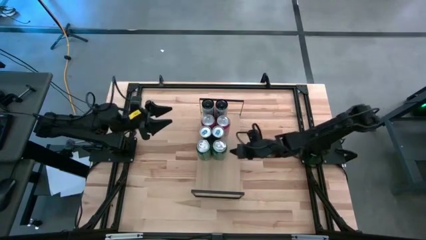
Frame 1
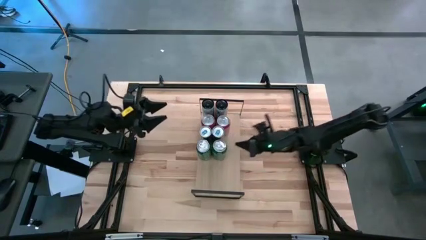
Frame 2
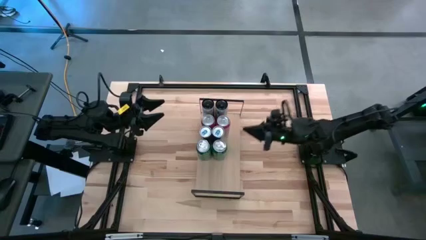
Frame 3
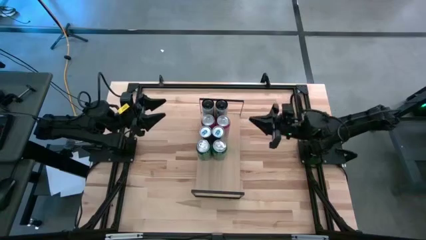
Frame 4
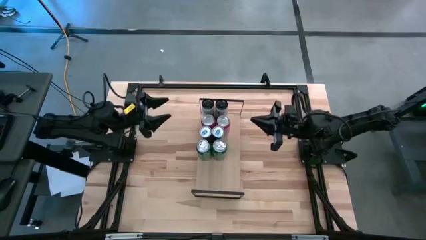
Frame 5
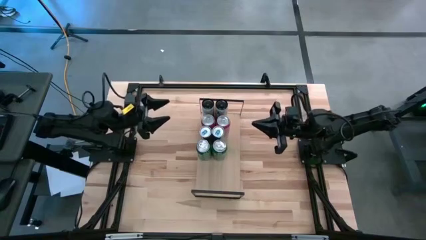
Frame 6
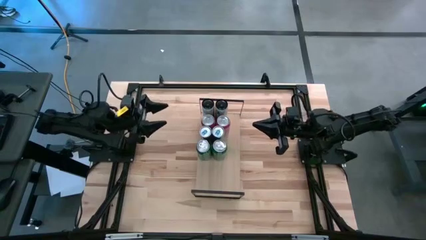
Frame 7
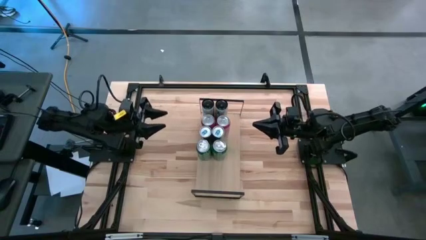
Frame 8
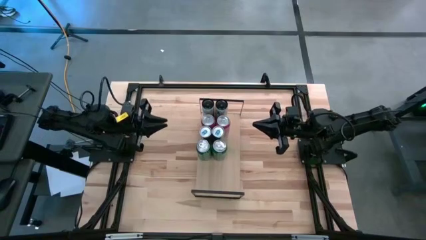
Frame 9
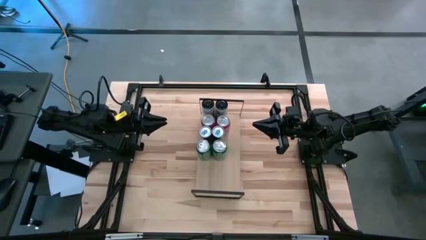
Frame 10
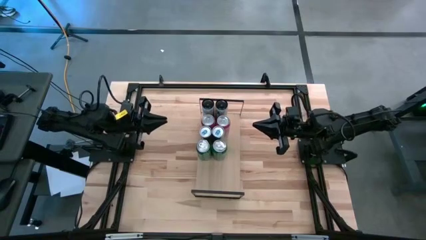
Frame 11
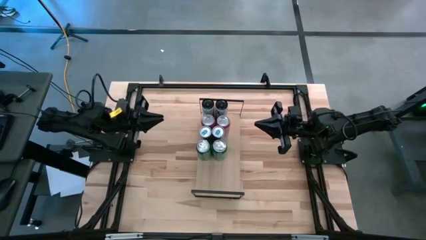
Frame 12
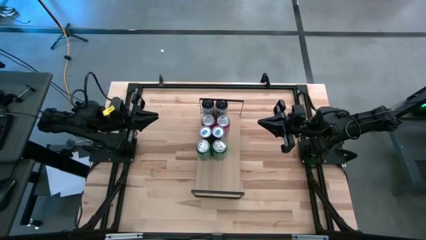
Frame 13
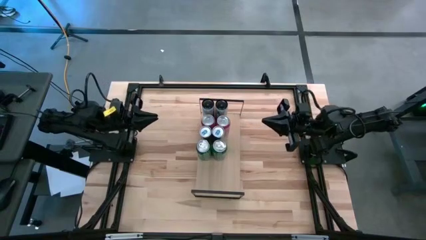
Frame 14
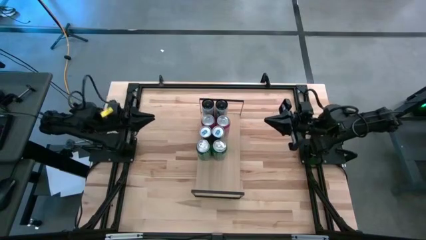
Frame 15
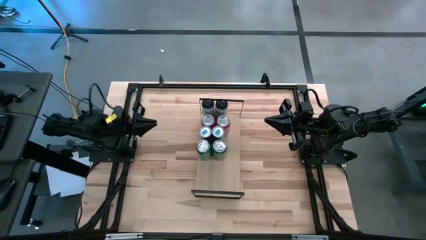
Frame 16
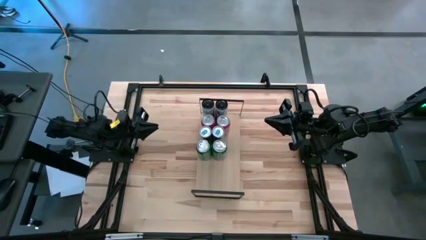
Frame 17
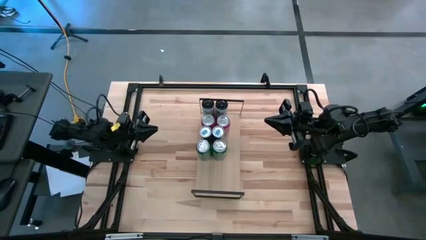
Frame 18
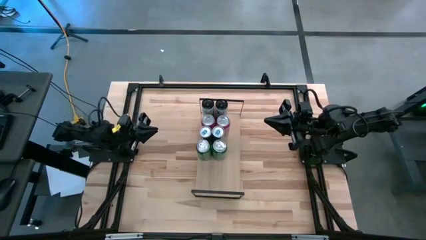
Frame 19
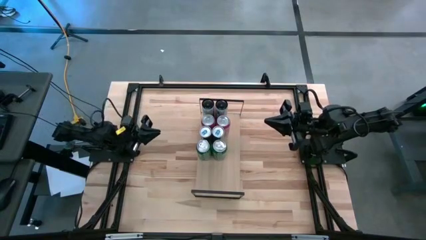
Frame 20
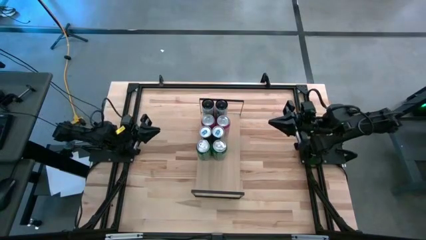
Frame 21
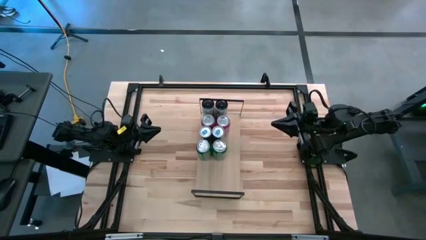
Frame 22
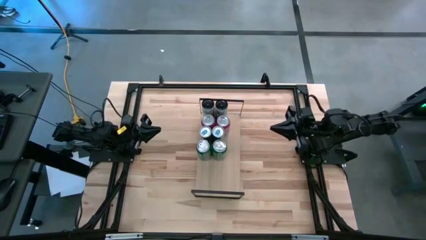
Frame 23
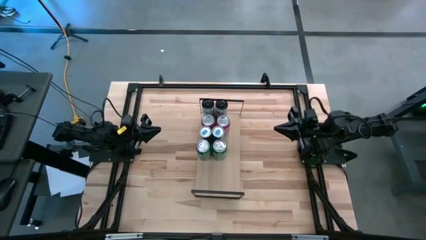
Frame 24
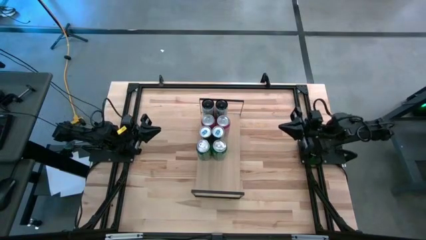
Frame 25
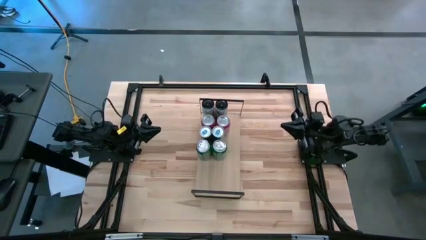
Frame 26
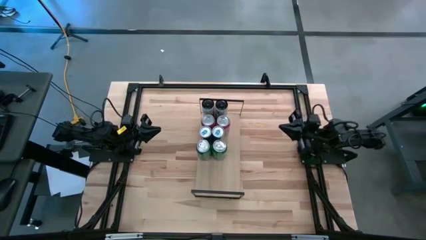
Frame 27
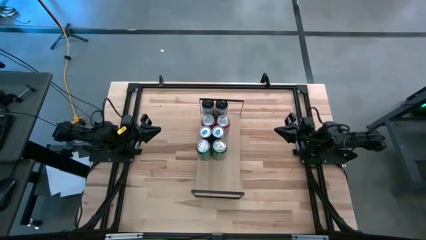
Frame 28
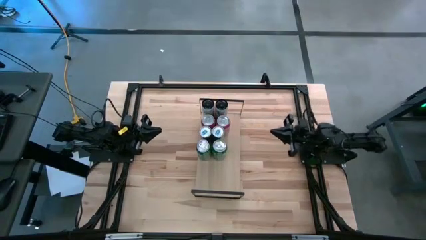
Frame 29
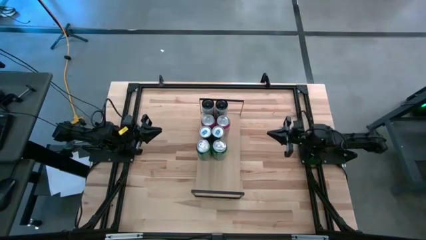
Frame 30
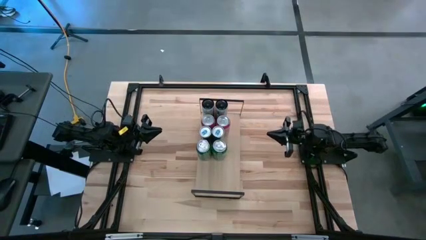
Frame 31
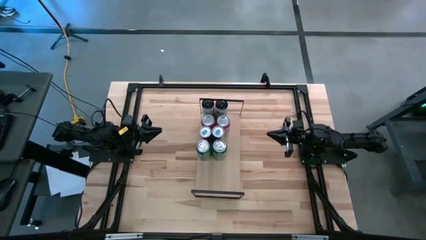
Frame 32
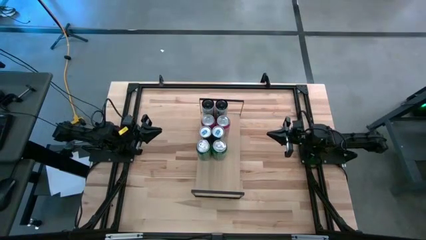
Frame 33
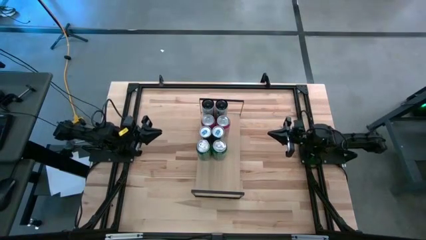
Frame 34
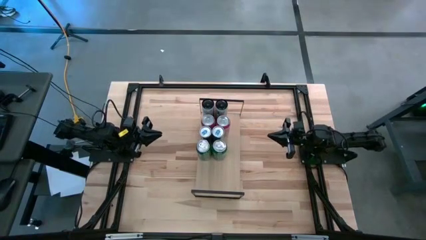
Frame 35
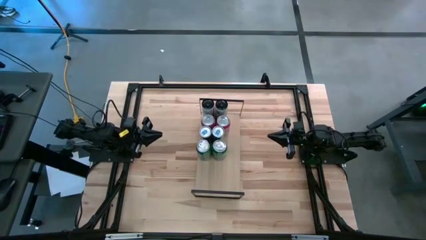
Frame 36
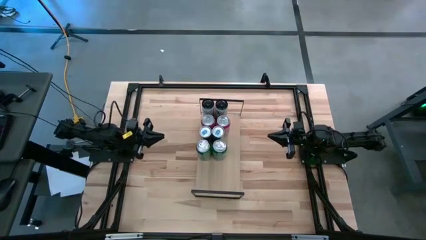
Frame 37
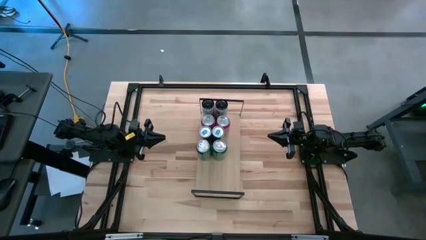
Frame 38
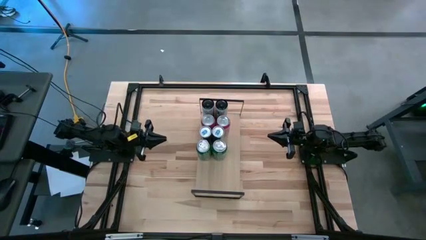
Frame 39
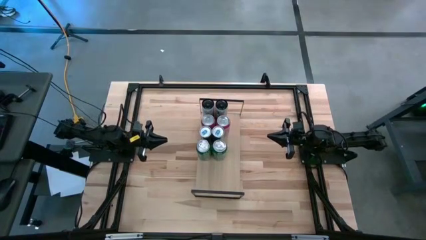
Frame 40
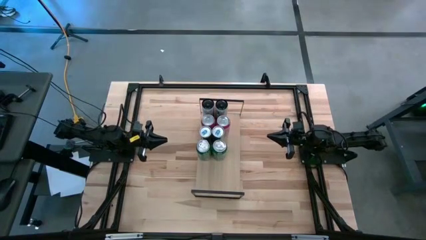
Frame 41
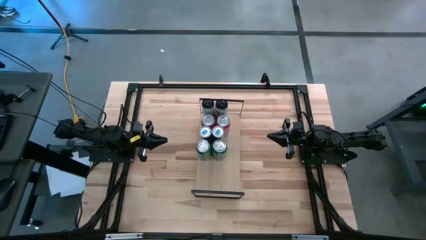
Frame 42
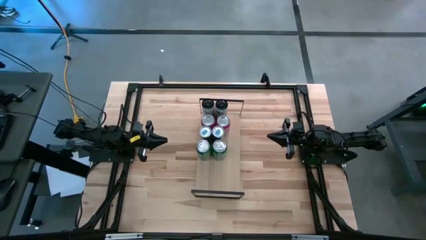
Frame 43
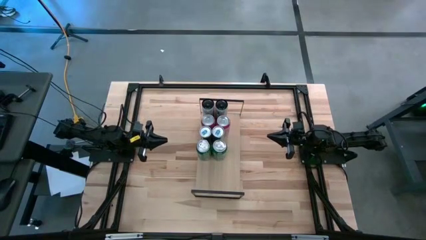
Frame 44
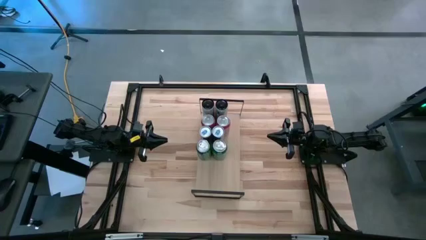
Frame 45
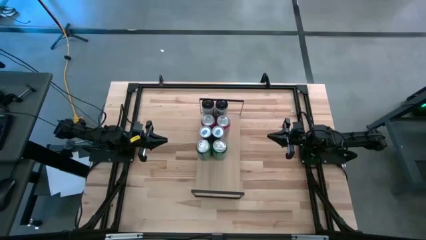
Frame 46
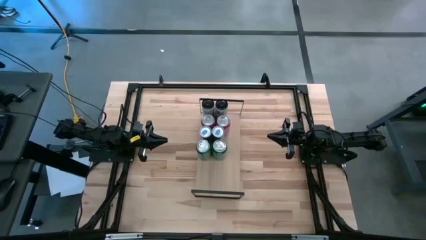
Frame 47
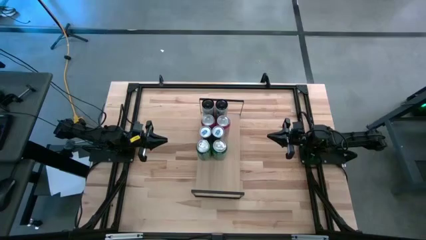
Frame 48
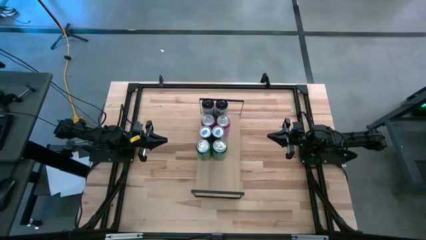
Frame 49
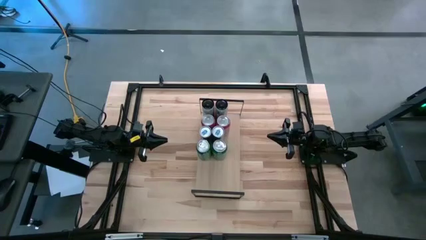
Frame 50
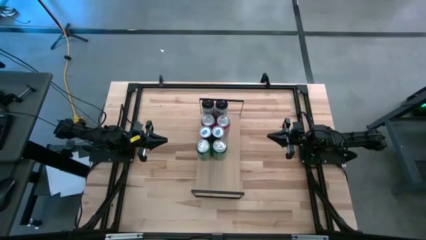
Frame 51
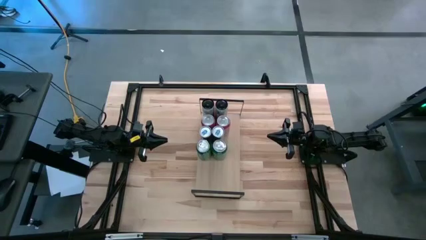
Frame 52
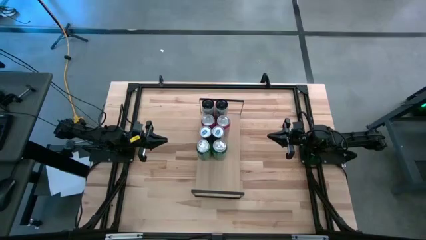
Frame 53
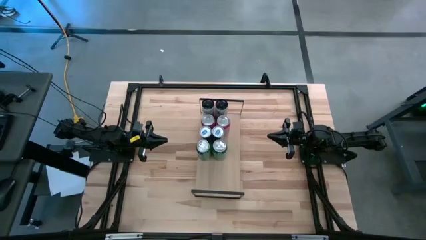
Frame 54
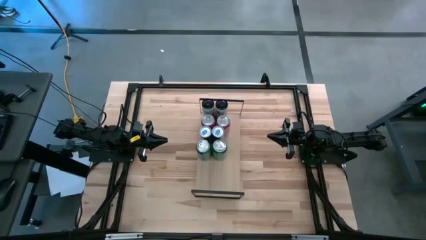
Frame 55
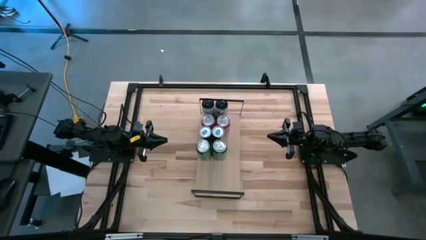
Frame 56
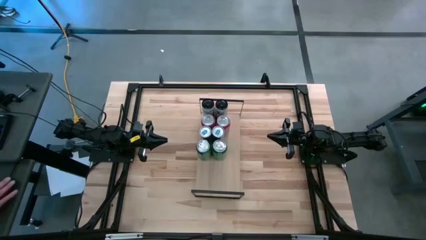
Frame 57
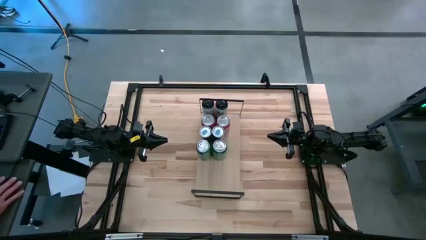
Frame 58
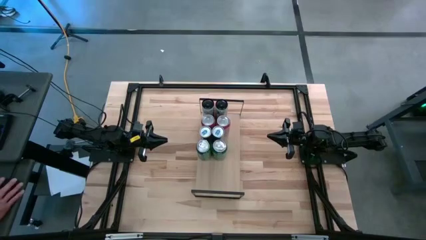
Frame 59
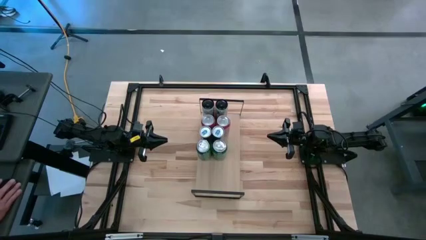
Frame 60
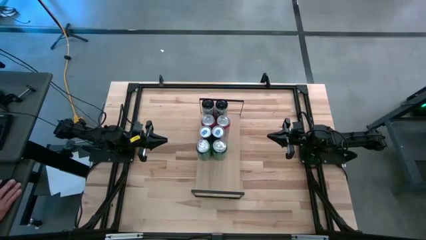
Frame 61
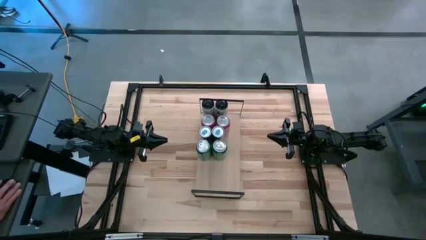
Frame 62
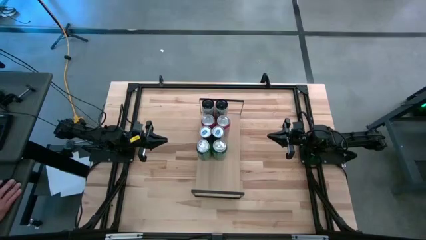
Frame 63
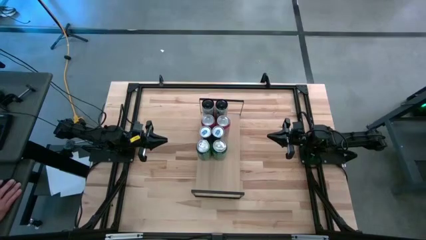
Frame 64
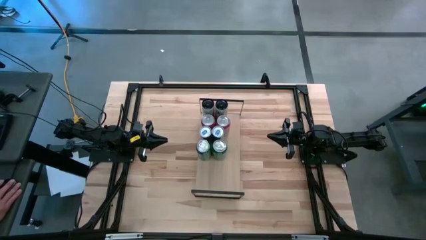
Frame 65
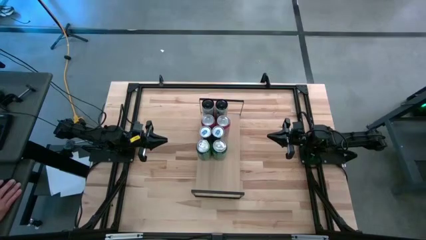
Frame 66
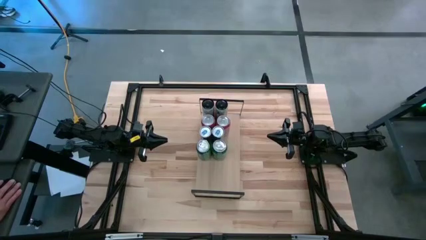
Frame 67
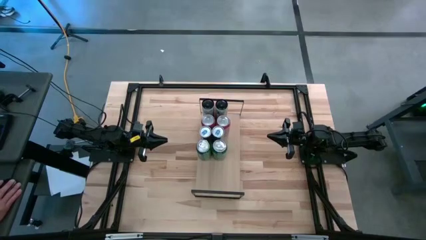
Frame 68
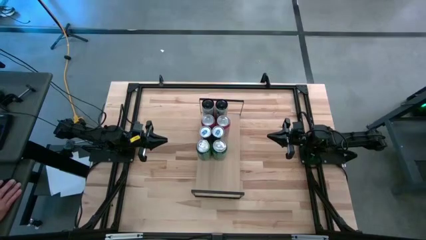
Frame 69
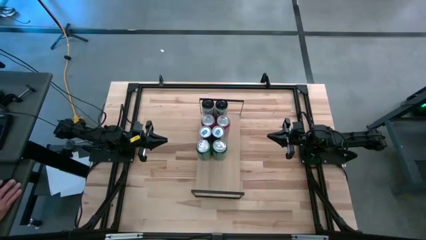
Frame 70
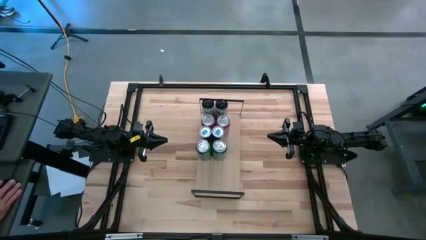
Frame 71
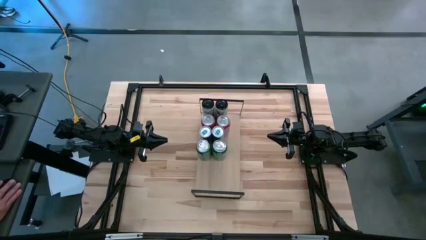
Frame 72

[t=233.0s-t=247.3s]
Task: Place canned beverage on shelf
Return to Home Position
